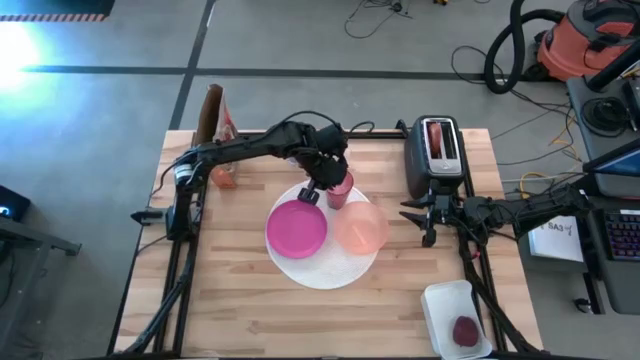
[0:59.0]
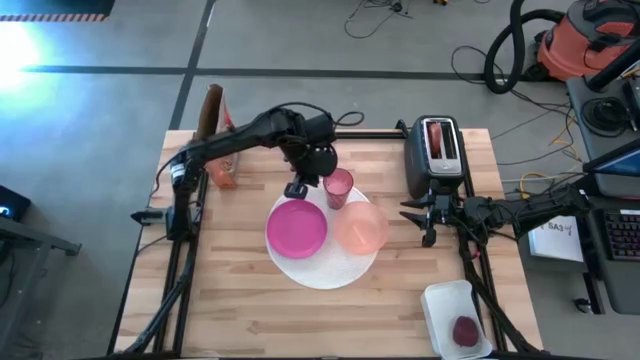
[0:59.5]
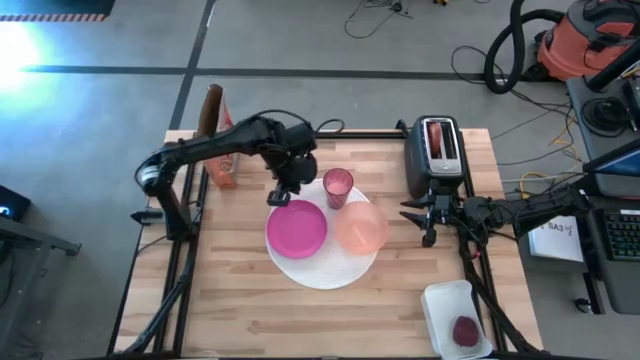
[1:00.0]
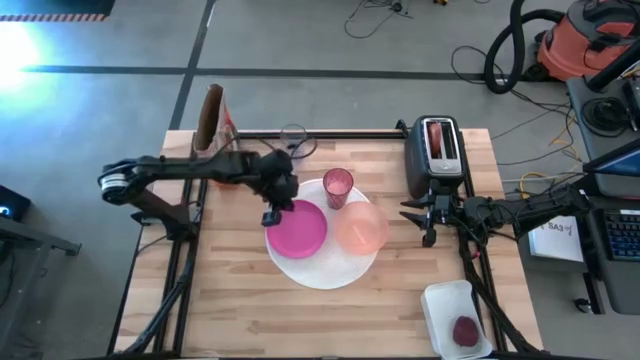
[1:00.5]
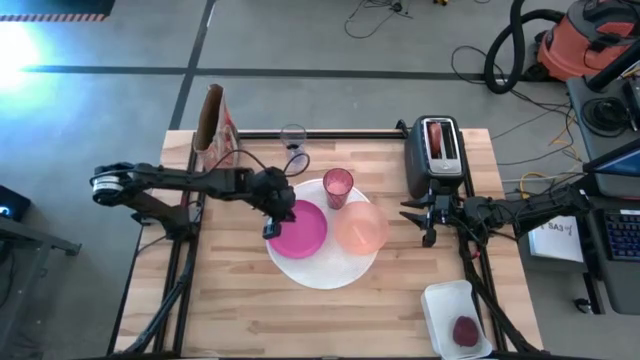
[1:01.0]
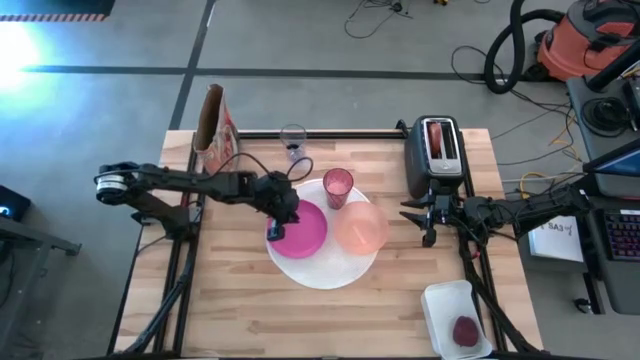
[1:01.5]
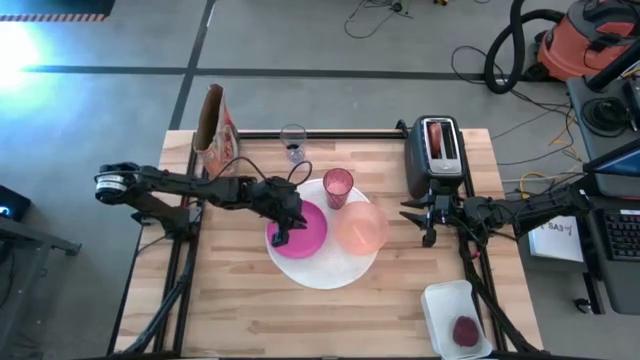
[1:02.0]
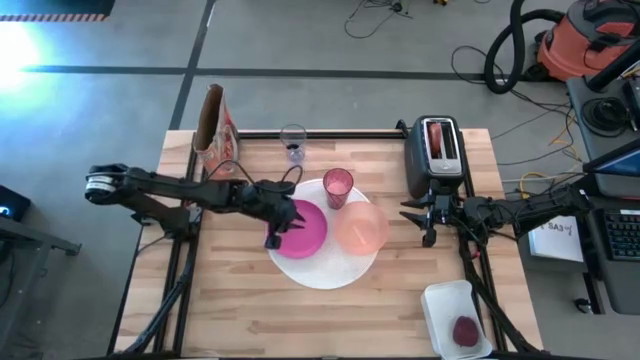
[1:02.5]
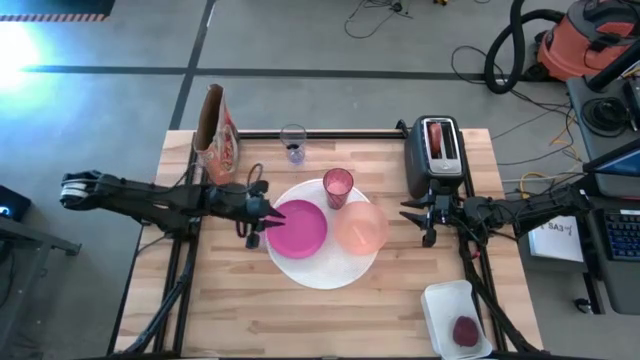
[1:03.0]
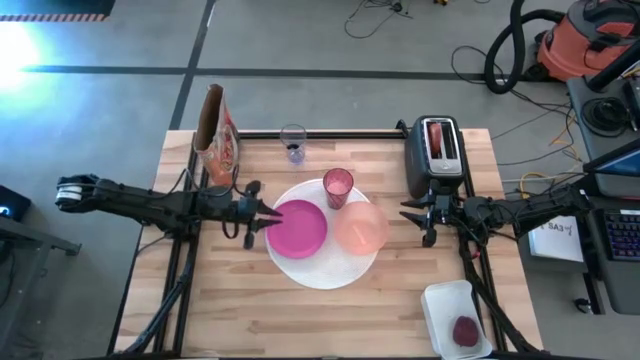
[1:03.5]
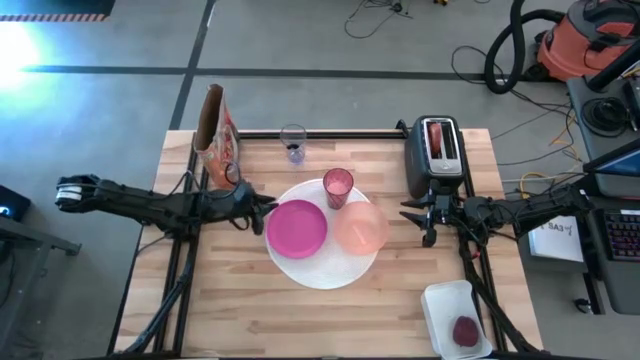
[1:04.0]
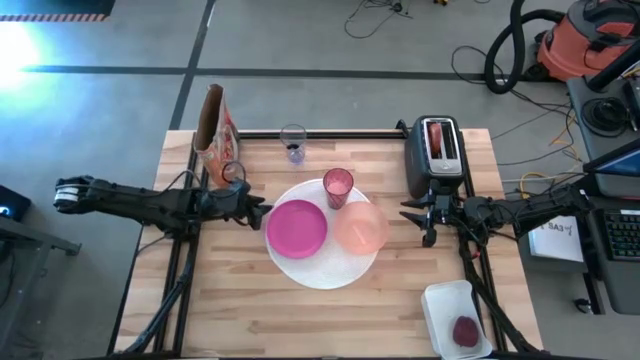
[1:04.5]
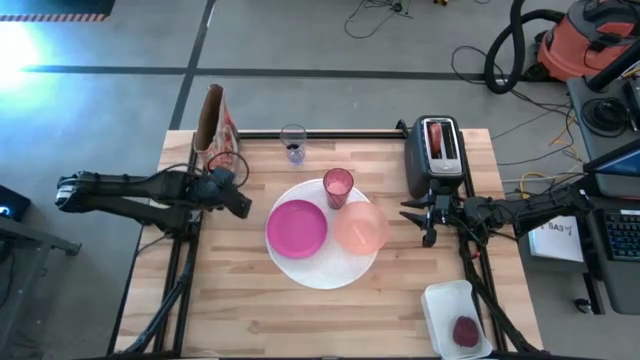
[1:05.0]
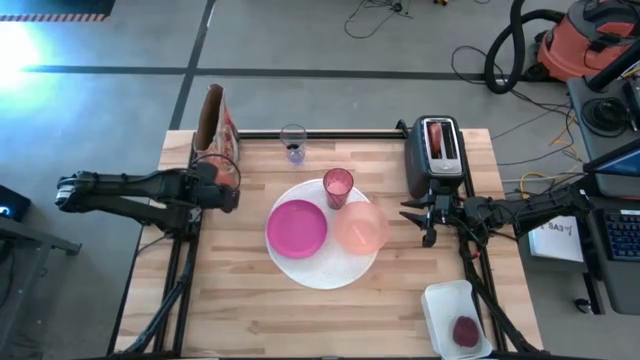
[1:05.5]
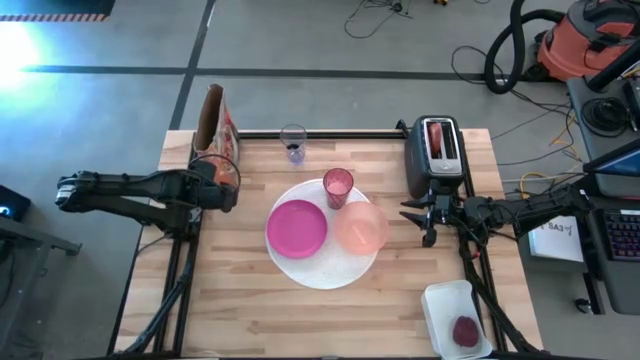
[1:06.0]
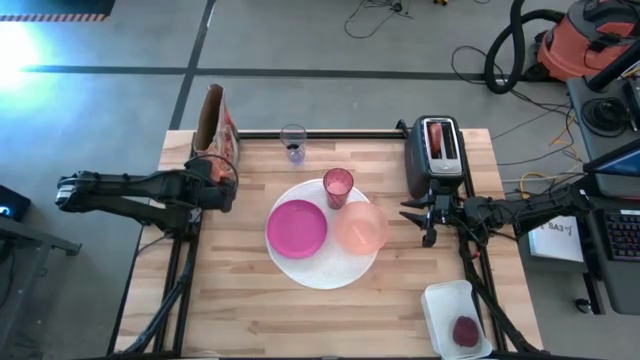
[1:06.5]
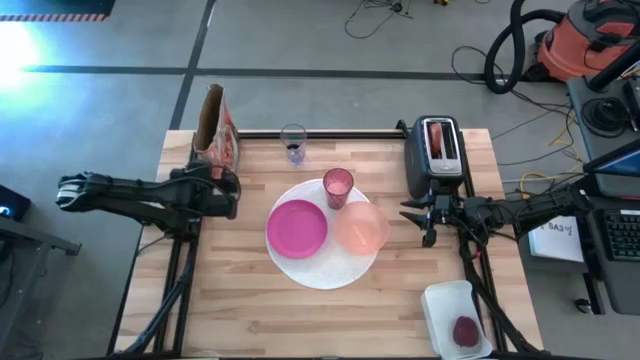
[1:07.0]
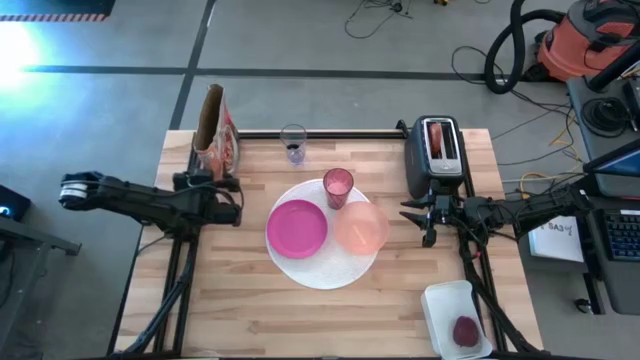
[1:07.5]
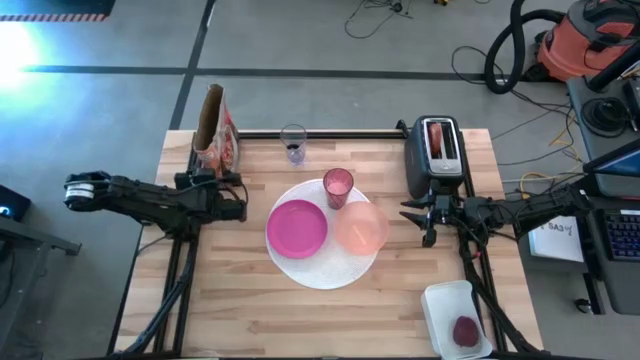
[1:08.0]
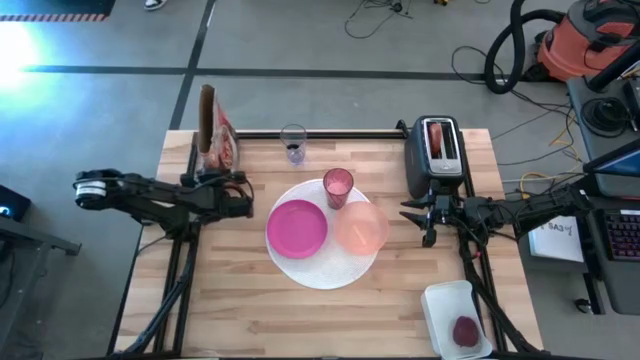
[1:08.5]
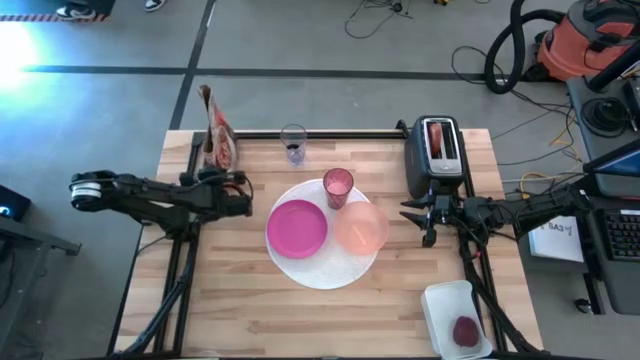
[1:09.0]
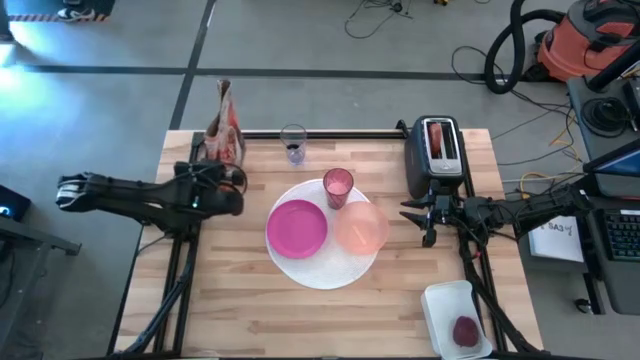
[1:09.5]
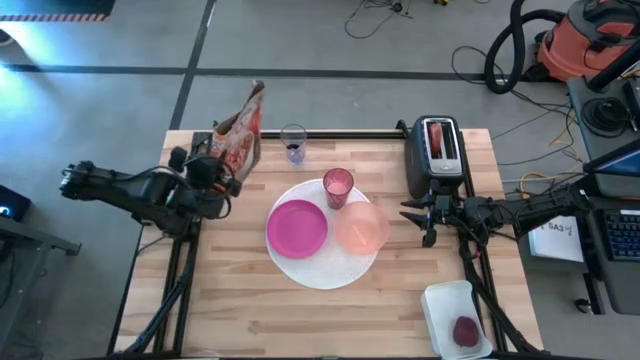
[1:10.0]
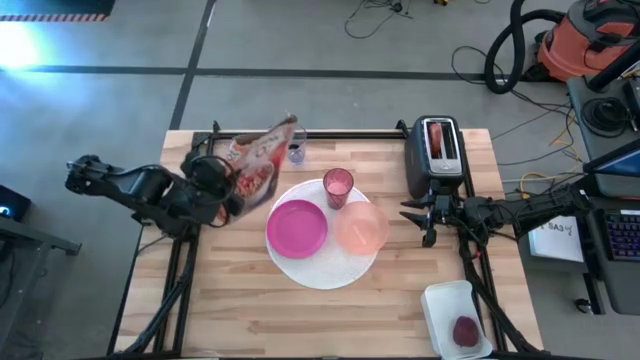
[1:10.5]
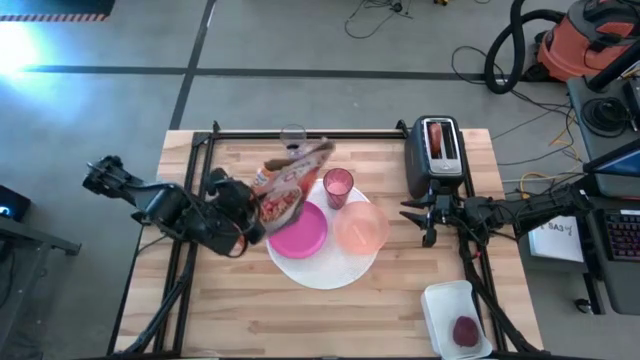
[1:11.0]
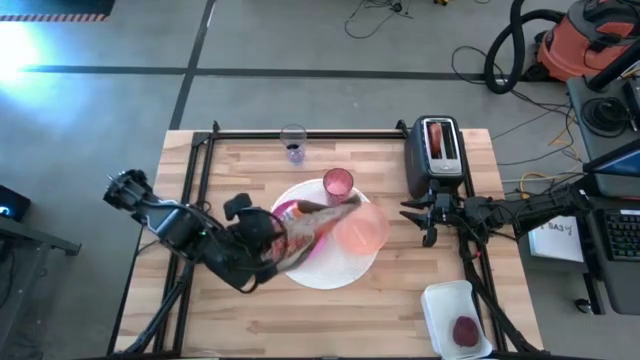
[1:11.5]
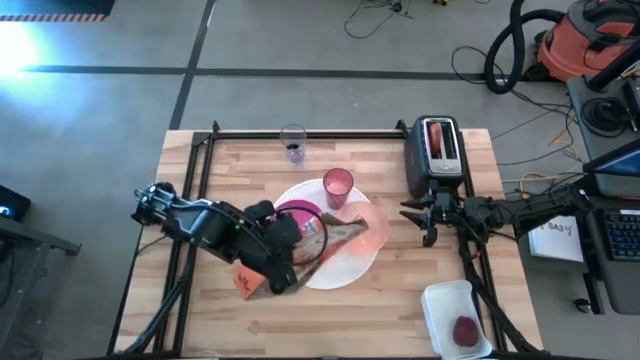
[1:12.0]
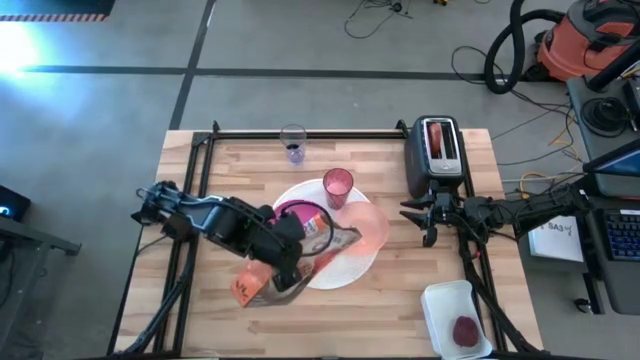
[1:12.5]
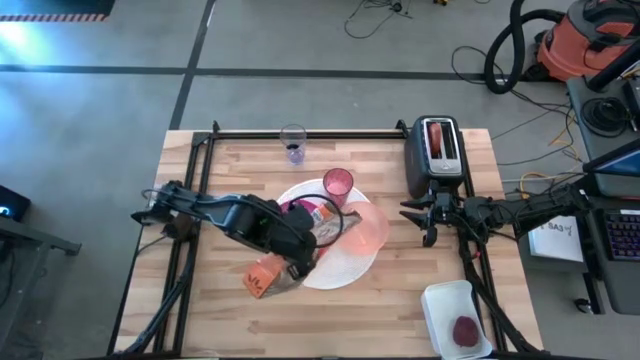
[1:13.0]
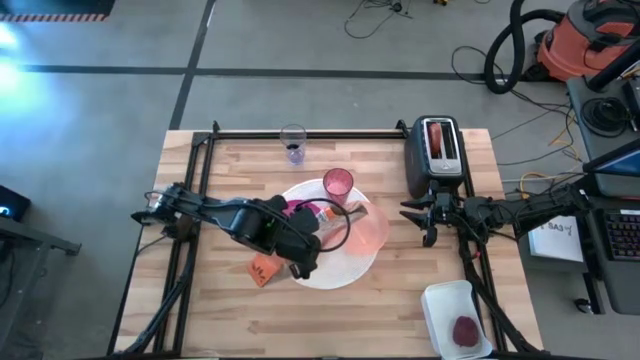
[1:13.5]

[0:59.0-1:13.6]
Task: Arrange a breakfast setting
Pour the cereal from the cereal box into the orange bowl

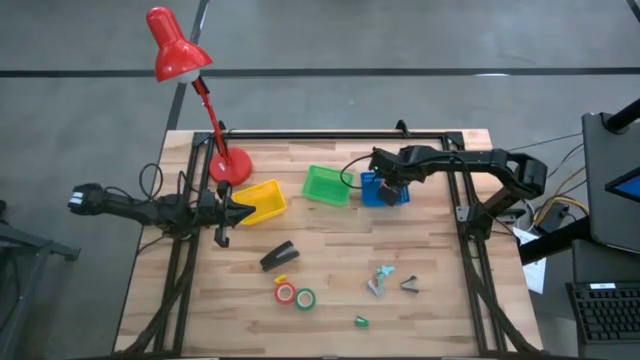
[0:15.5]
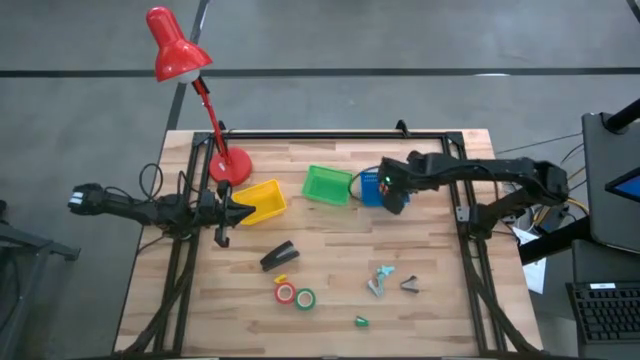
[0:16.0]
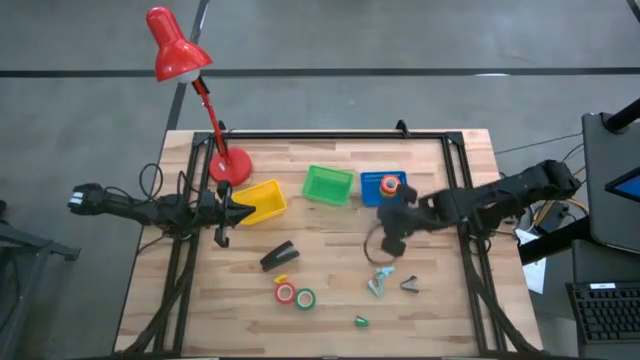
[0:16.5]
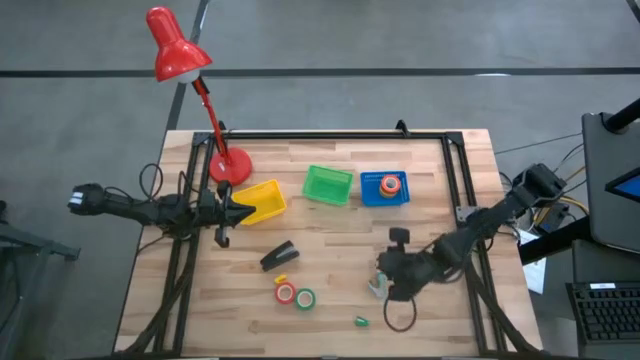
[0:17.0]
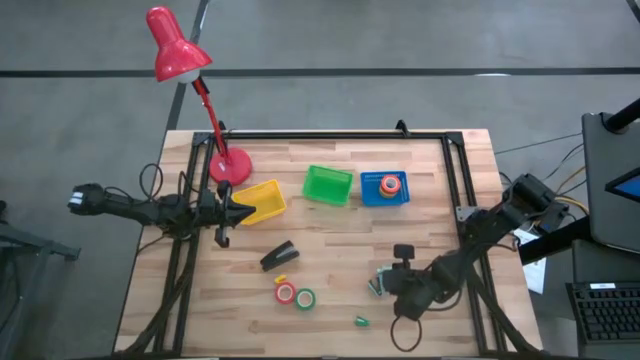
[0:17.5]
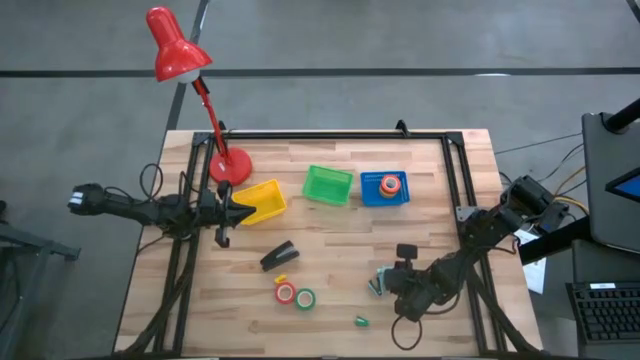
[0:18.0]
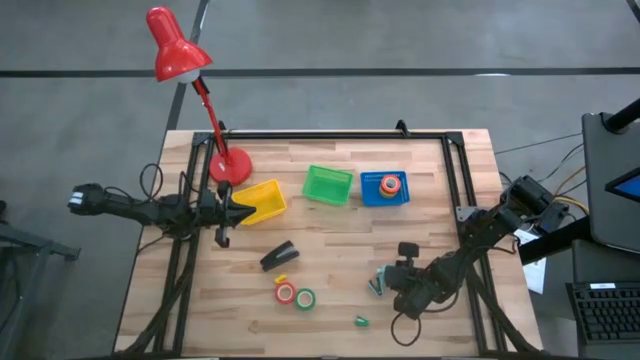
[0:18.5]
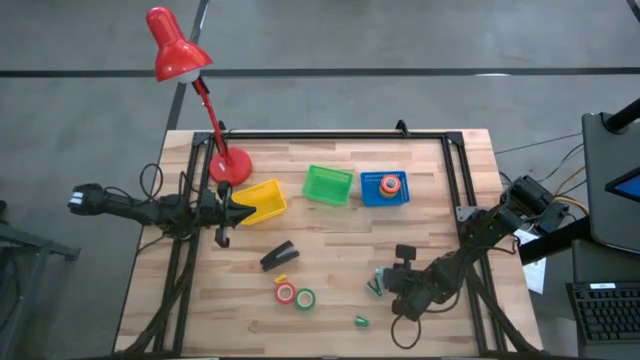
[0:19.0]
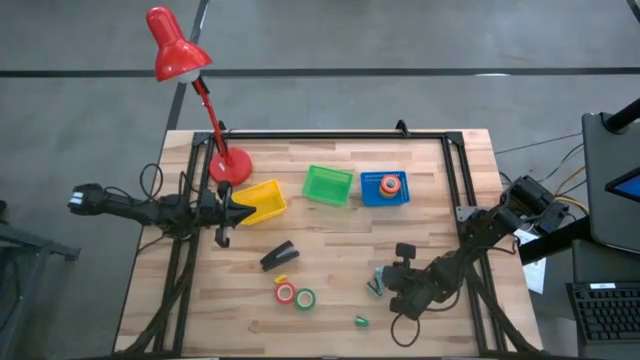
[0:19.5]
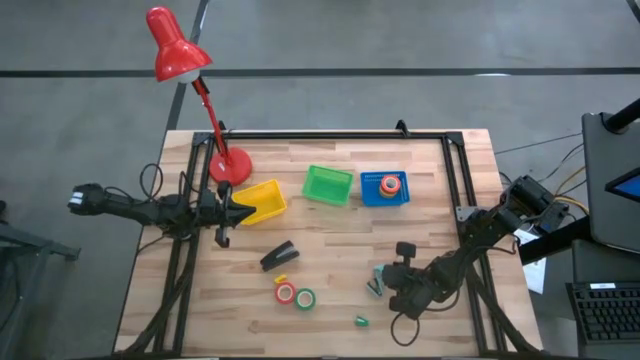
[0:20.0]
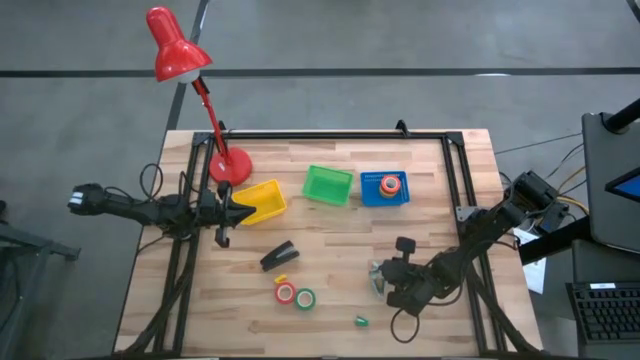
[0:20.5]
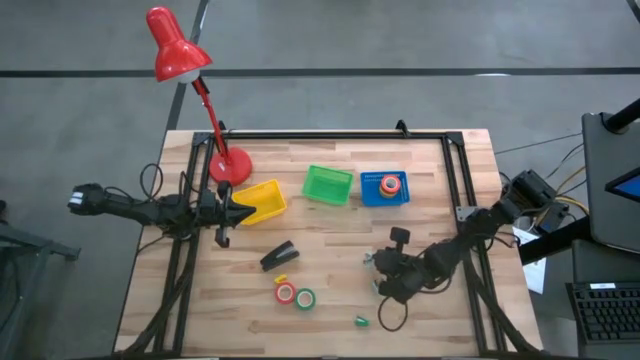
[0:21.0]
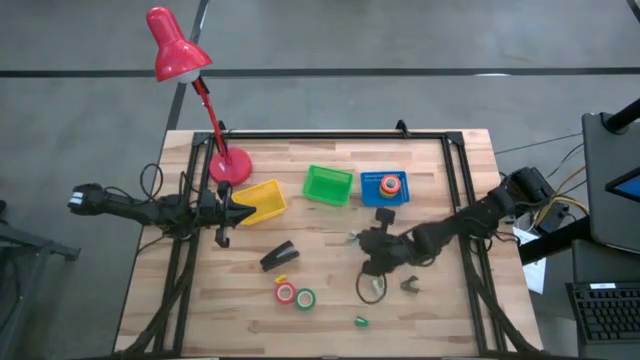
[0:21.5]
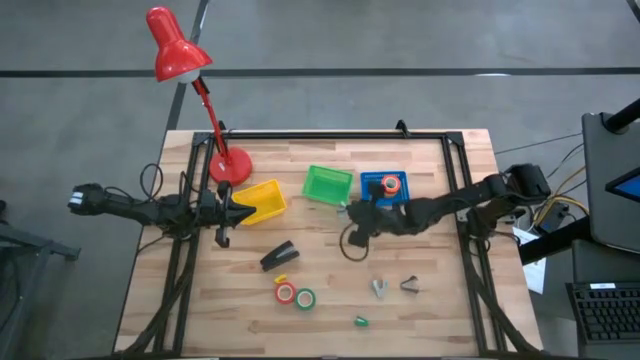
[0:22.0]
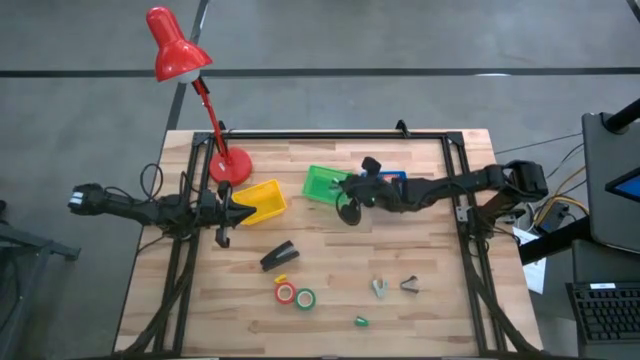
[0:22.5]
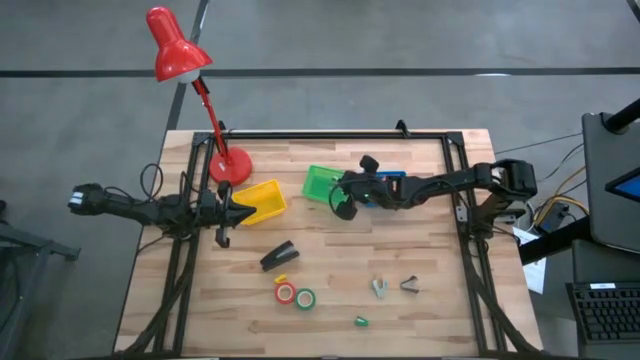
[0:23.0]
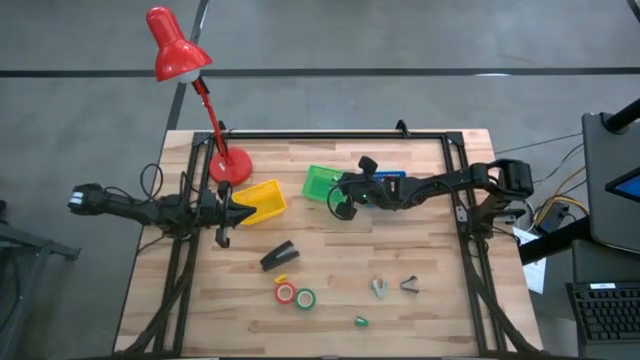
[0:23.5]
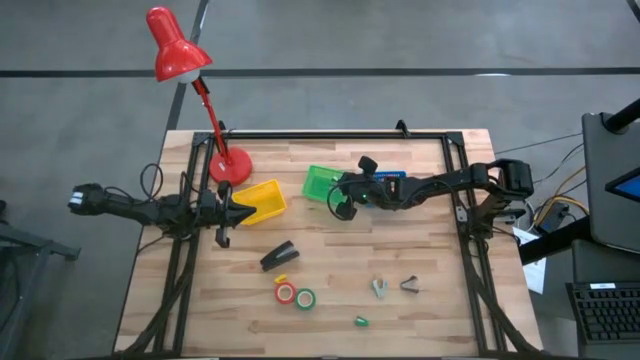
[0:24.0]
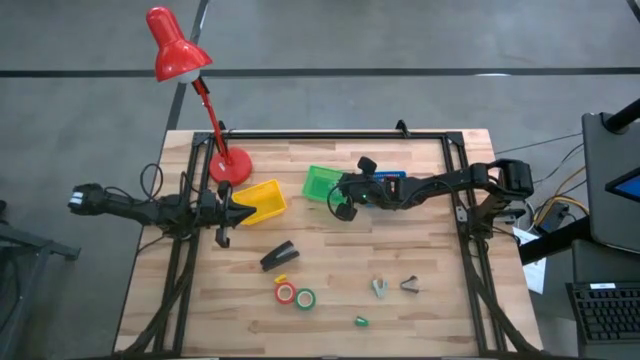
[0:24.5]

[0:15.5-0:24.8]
Task: Pick and place Stapler, Stapler remover, tape
Put the top light blue staple remover in the green basket
